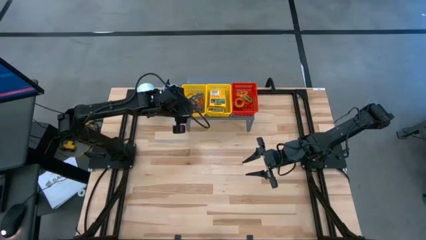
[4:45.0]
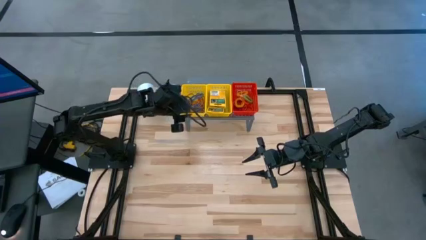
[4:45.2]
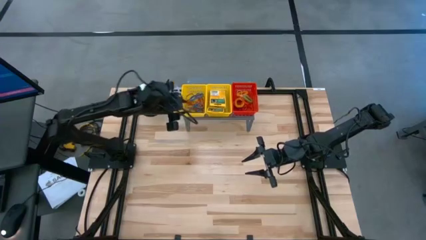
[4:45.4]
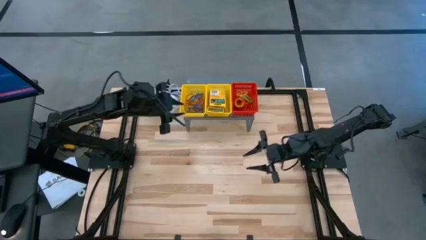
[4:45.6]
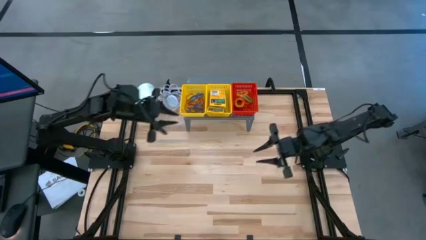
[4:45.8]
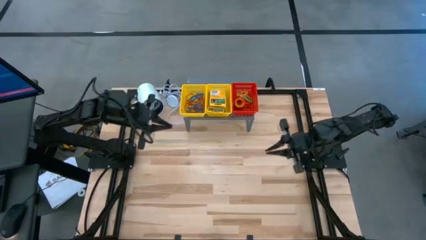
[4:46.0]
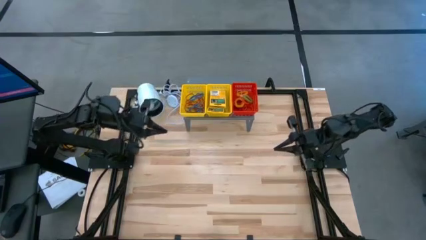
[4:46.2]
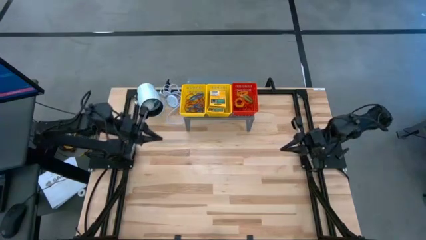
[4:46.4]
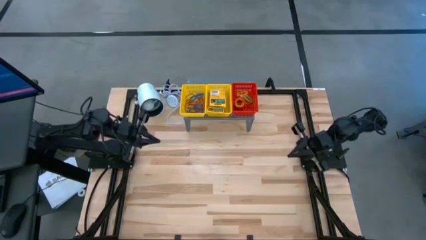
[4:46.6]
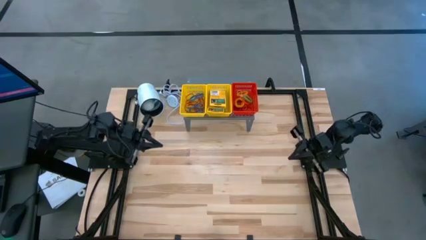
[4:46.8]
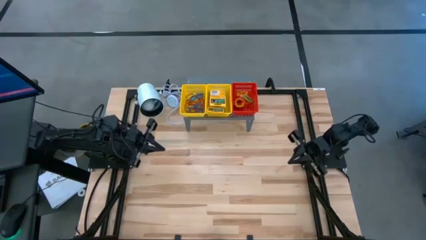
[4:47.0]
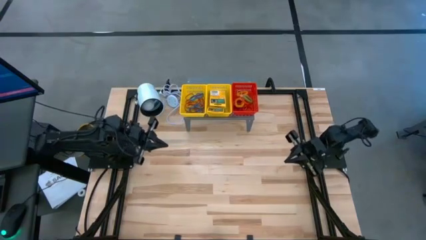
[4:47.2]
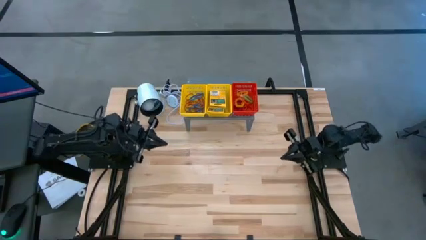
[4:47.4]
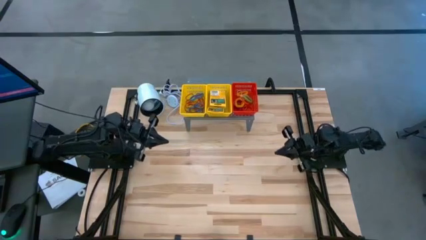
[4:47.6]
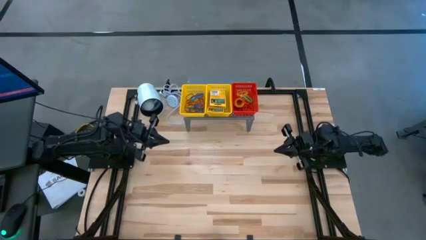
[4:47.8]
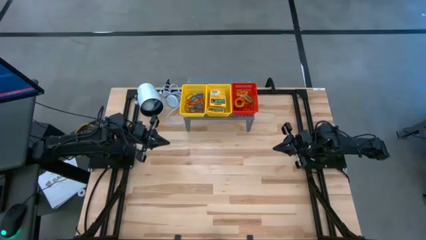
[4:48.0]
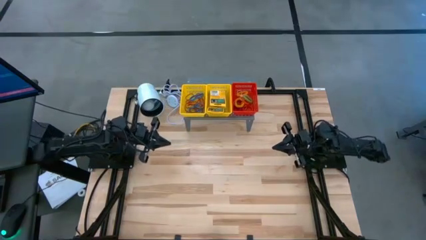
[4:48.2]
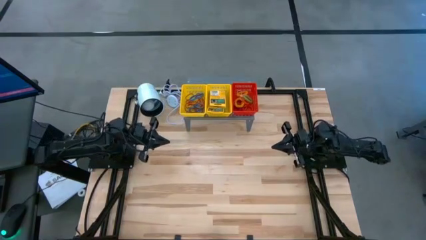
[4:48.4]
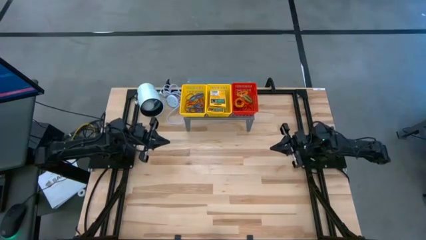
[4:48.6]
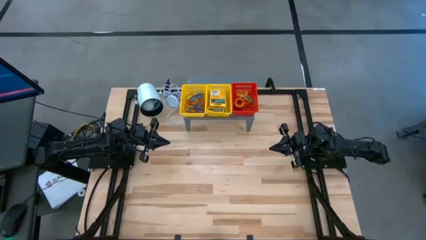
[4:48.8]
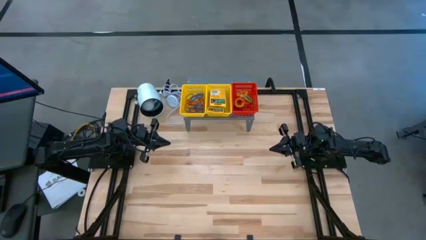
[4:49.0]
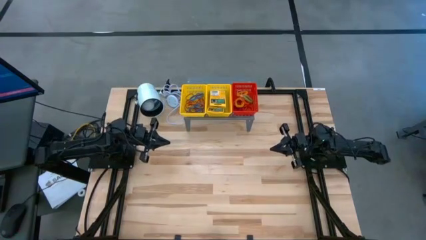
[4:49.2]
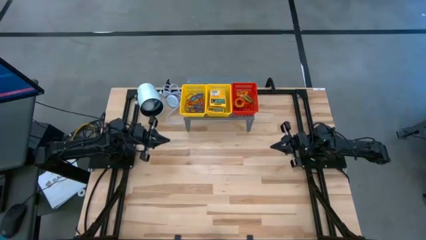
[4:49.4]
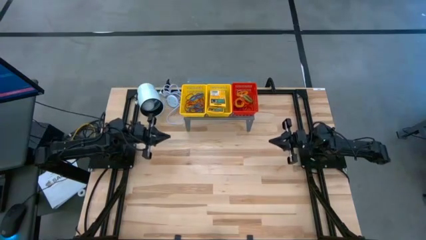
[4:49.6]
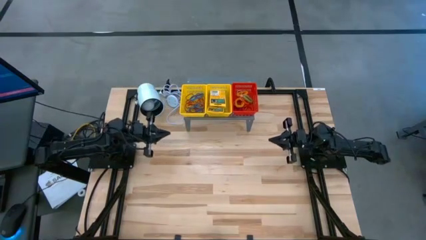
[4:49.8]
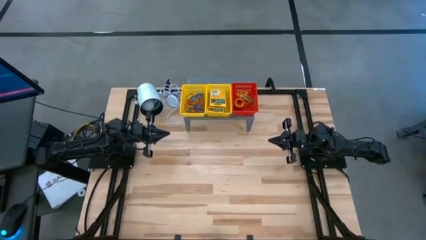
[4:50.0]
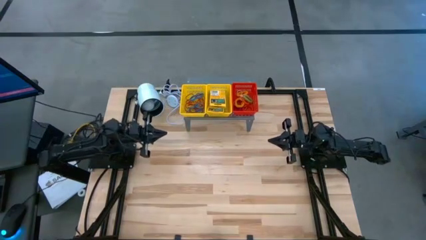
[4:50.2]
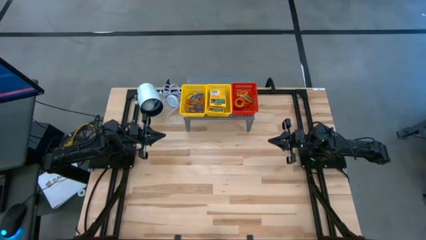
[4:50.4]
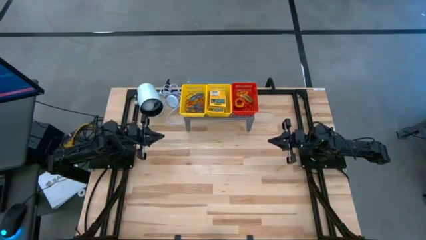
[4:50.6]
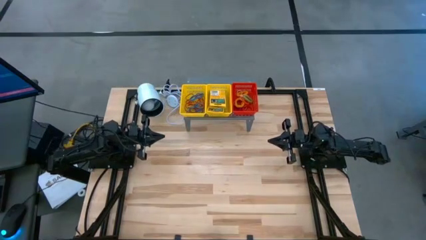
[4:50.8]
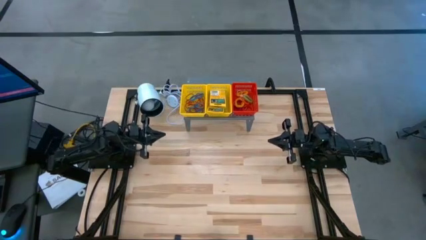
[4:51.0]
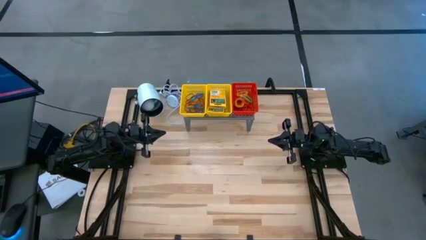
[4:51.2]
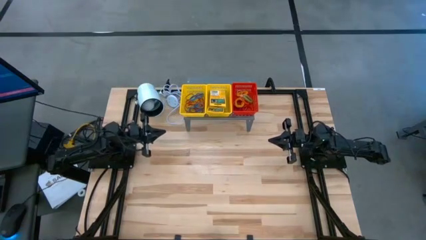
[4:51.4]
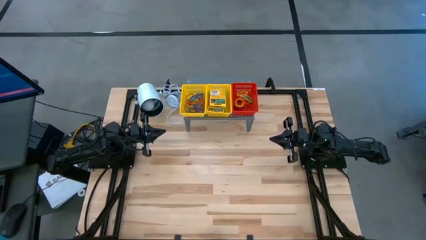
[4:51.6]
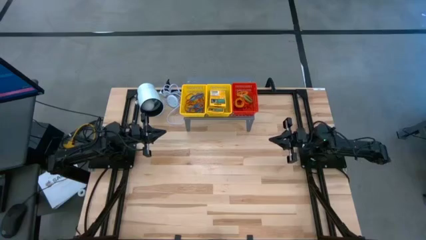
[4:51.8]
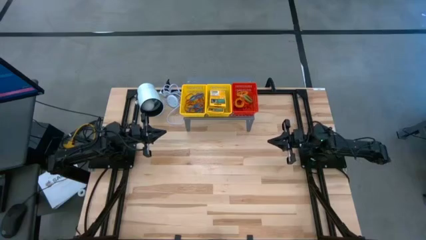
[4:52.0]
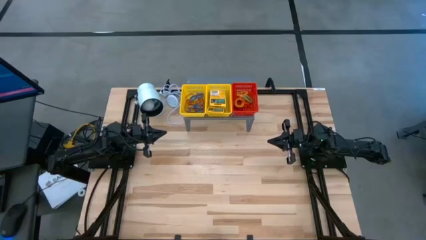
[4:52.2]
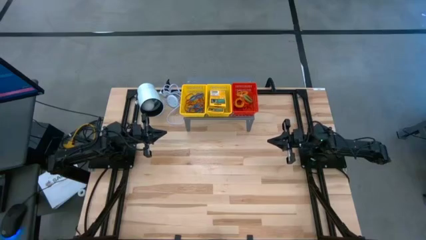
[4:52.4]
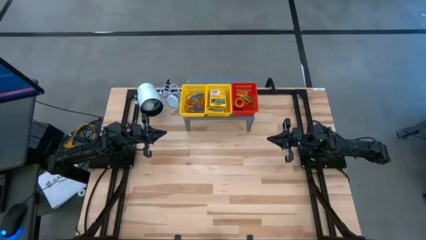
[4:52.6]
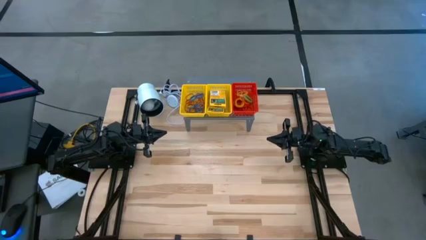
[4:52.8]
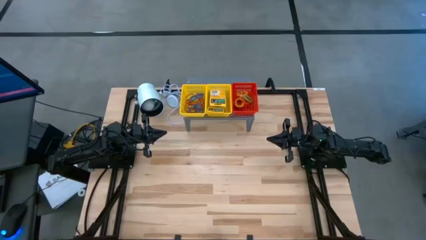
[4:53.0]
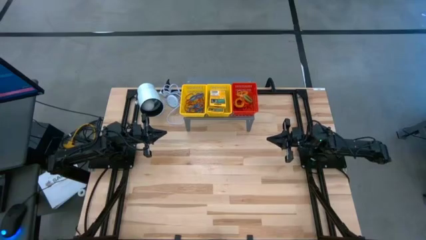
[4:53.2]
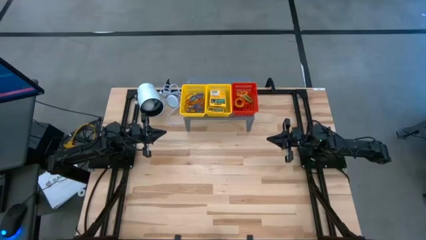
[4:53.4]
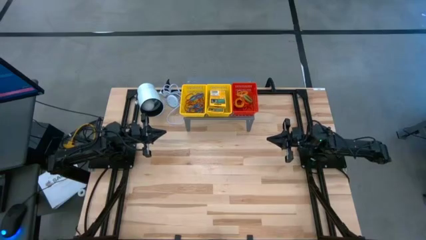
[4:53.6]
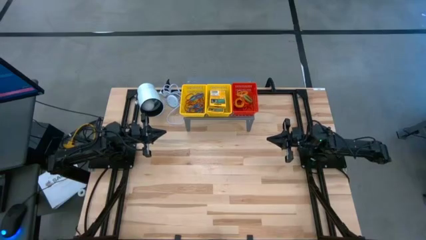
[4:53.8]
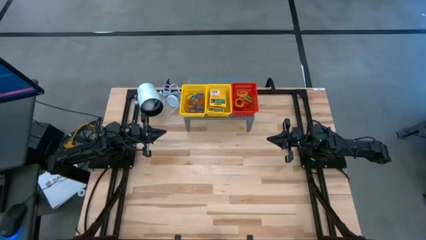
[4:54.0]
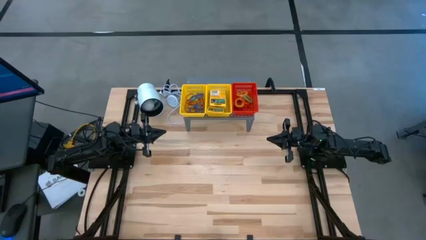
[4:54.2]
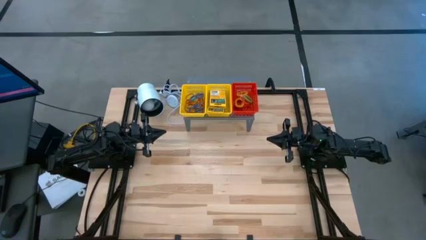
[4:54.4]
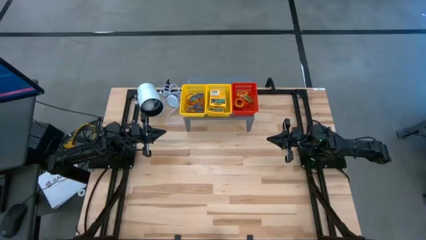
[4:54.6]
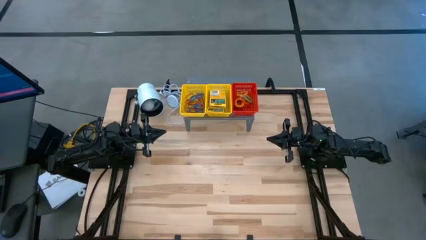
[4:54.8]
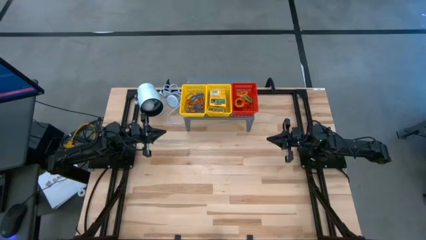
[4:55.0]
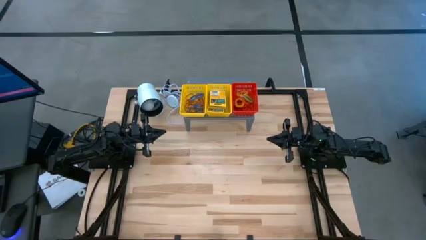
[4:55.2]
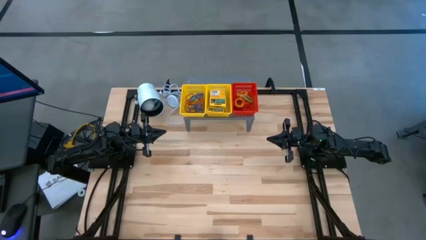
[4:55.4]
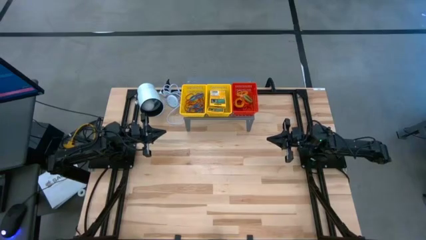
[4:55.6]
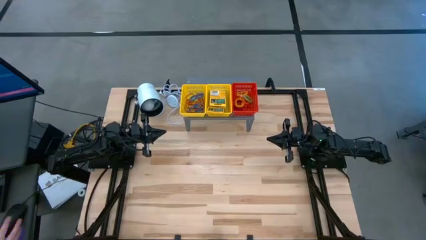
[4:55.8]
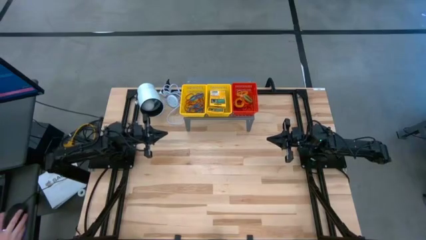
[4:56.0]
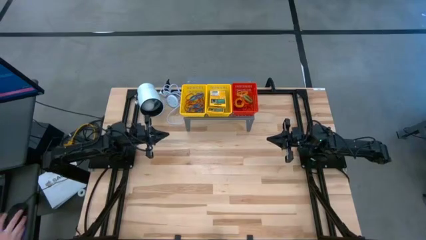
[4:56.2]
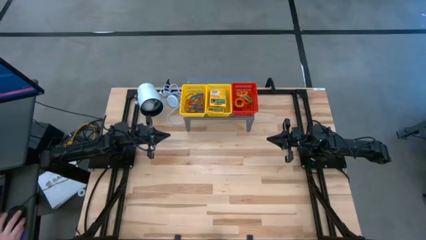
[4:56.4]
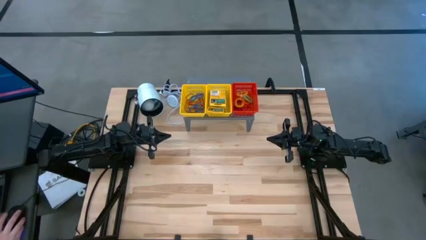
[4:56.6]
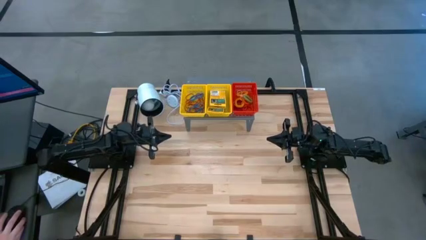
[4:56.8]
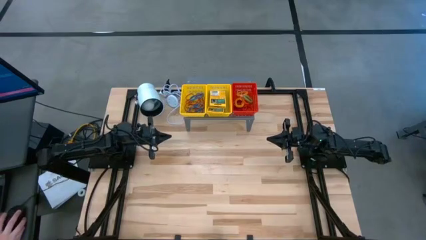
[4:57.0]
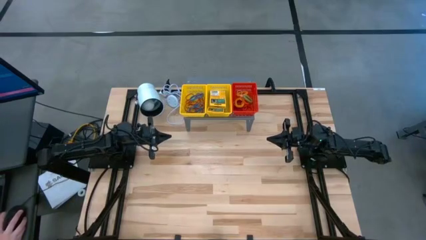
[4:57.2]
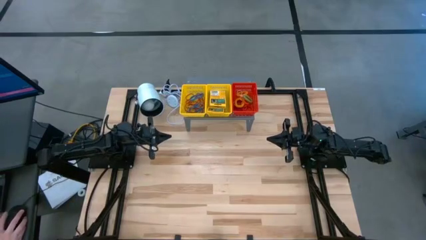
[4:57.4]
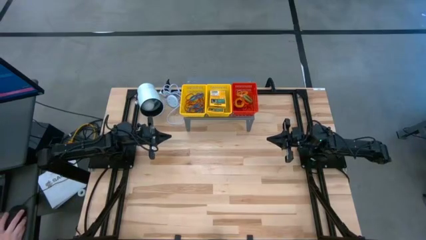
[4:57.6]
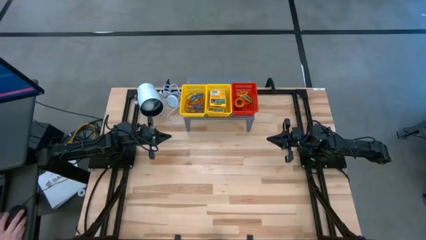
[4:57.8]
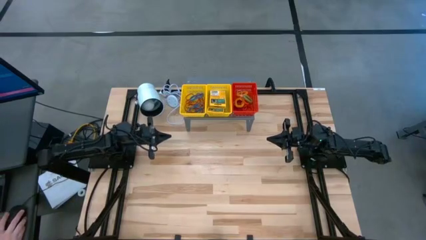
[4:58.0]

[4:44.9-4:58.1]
Task: Pick & Place Office Desk Supplies
Return to Home Position

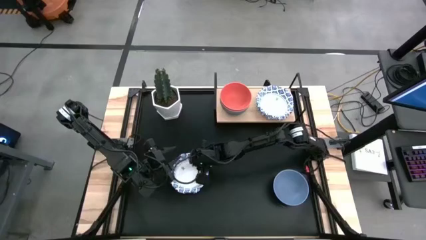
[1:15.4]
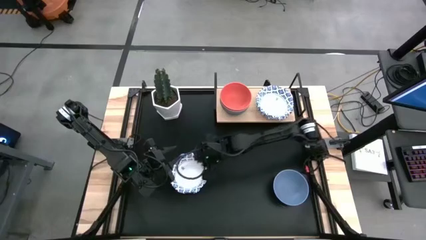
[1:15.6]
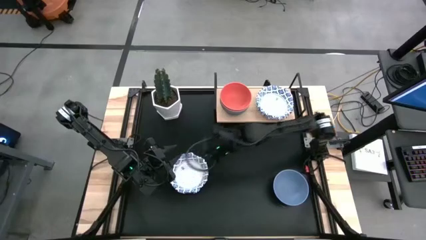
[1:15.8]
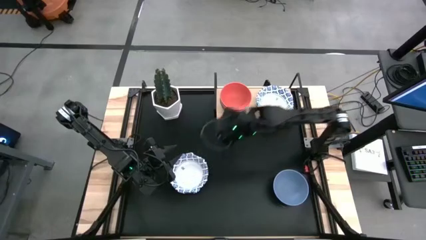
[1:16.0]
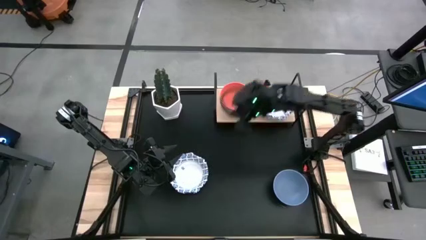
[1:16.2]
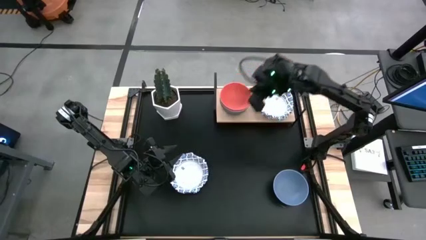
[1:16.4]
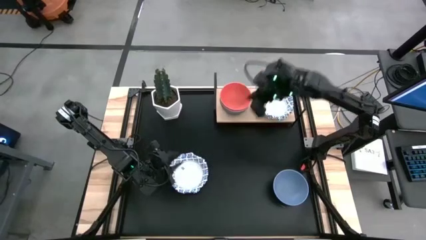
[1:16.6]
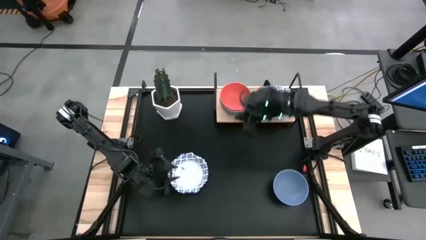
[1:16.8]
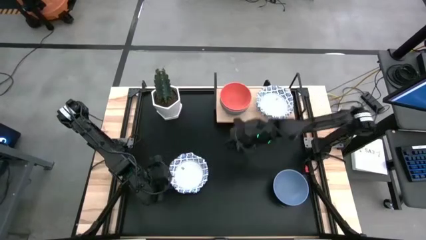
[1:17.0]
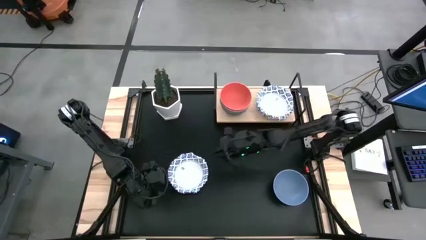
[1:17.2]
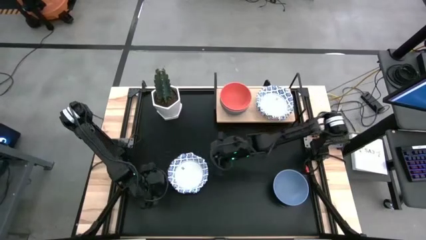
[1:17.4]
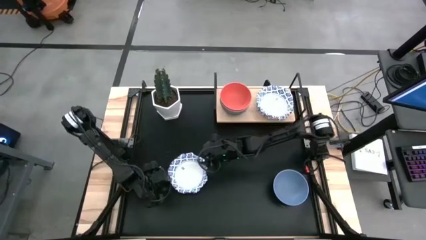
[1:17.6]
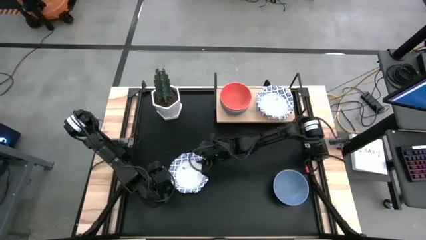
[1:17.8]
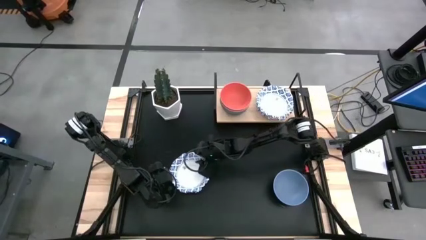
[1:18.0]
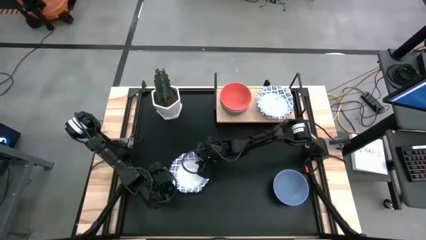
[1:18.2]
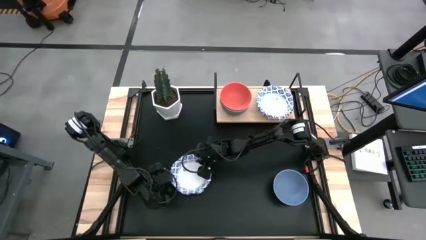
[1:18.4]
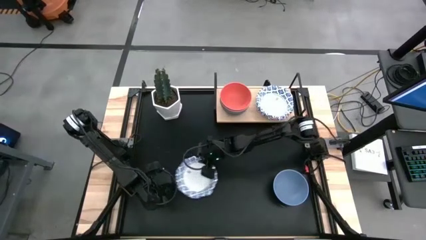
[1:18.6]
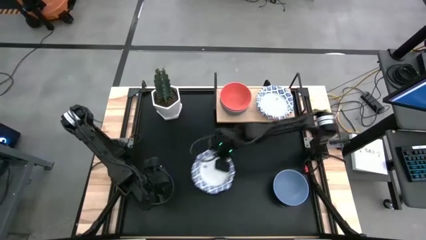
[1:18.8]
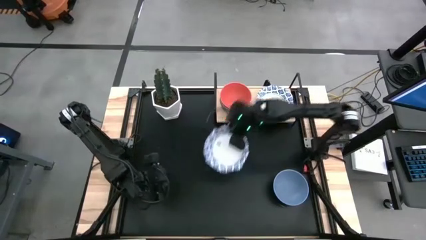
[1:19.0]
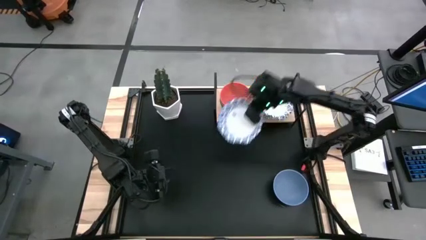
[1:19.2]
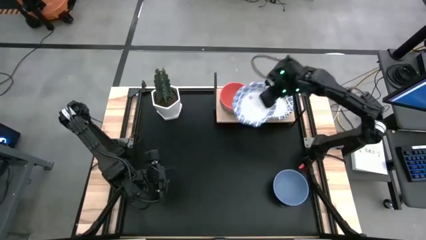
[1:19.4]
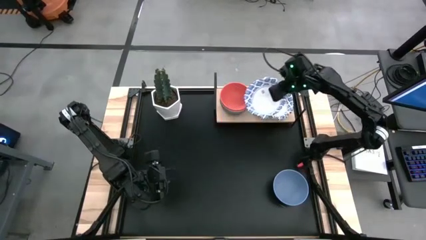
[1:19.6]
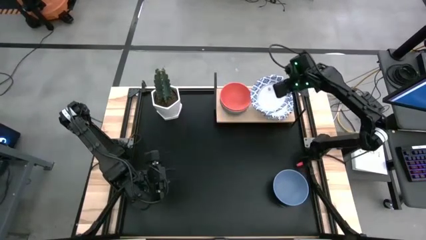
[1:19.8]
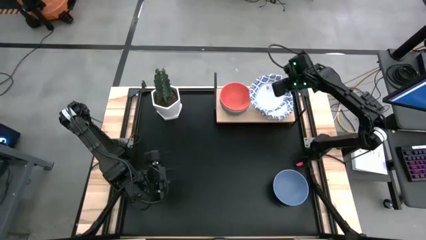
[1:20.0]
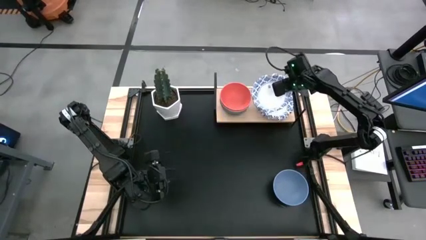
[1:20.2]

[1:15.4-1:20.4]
Task: Place and stack bowls onto a shelf
Stack the blue patterned bowl on top of the blue patterned bowl on the shelf
